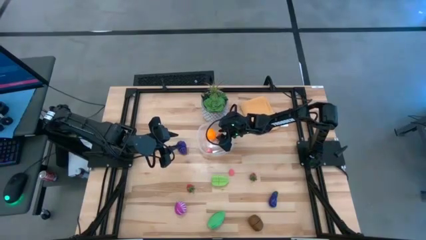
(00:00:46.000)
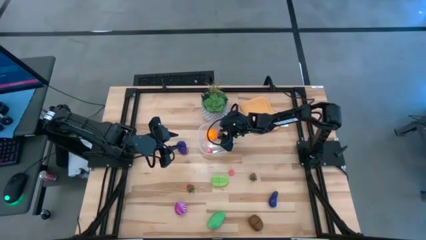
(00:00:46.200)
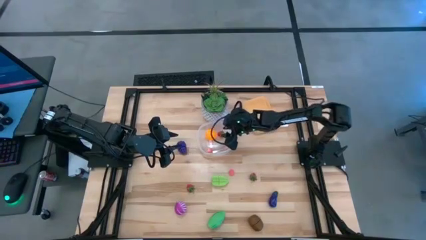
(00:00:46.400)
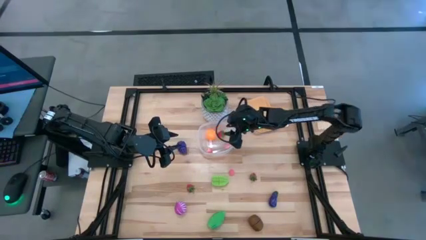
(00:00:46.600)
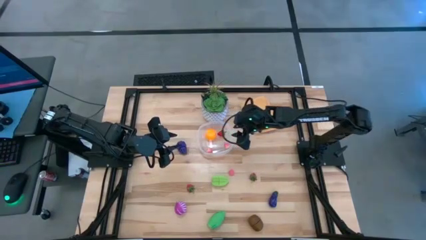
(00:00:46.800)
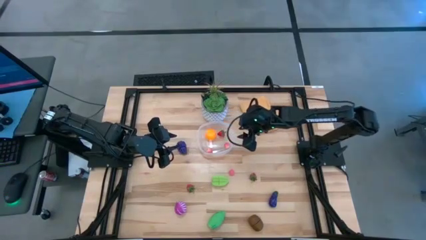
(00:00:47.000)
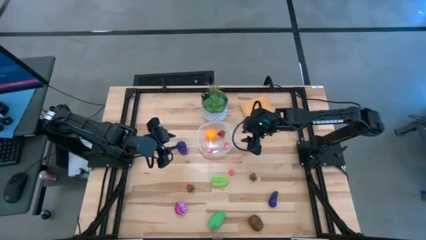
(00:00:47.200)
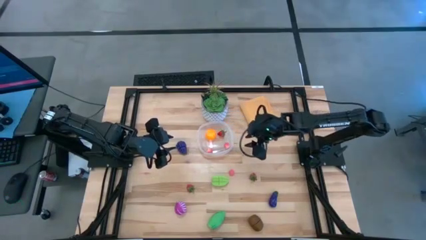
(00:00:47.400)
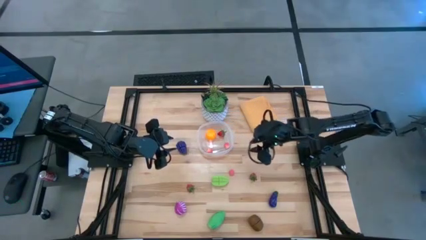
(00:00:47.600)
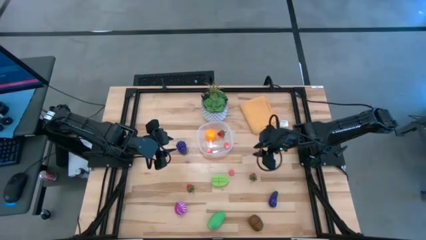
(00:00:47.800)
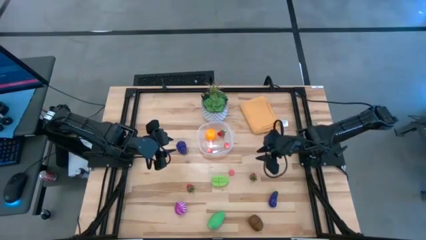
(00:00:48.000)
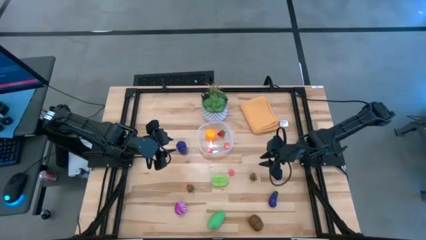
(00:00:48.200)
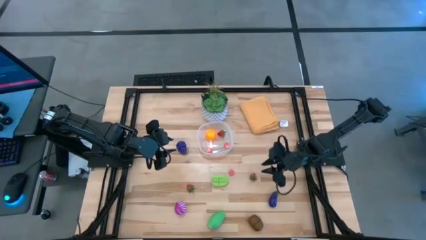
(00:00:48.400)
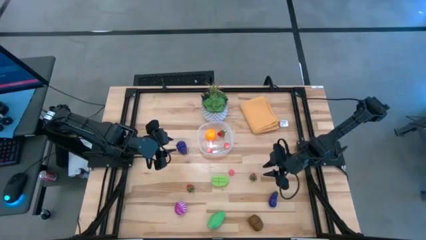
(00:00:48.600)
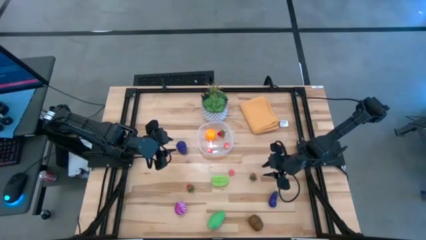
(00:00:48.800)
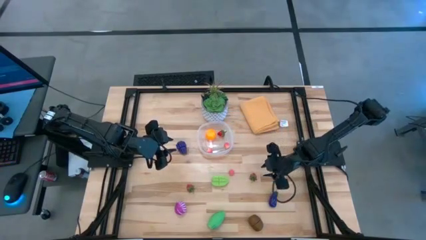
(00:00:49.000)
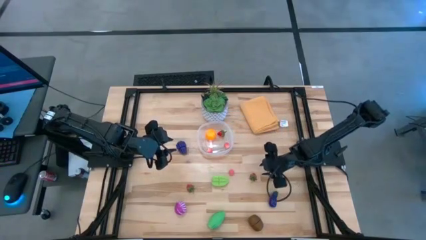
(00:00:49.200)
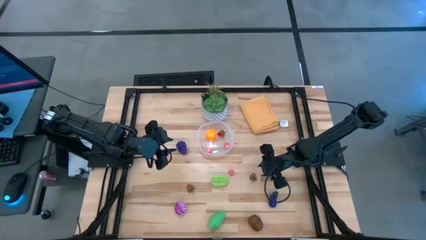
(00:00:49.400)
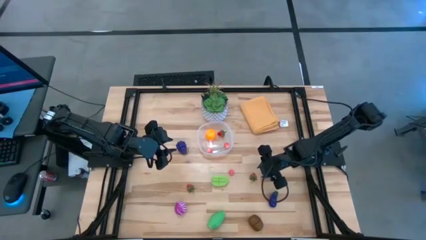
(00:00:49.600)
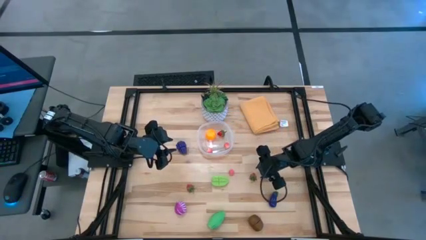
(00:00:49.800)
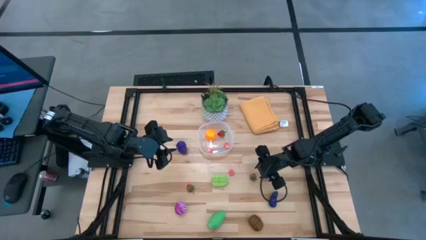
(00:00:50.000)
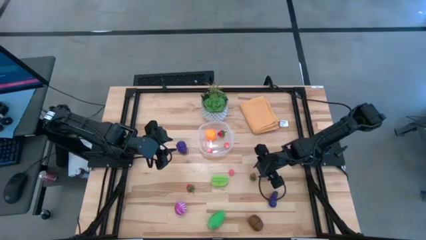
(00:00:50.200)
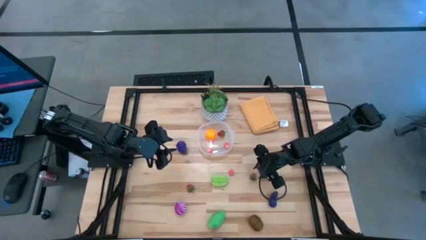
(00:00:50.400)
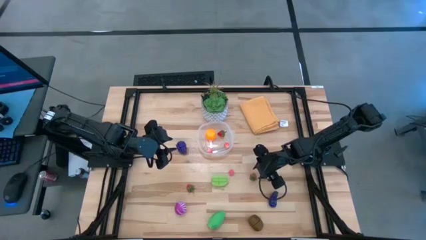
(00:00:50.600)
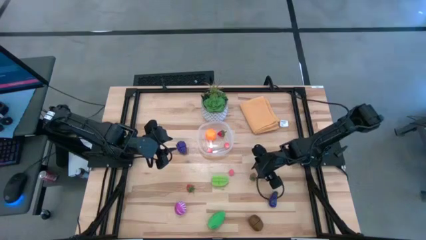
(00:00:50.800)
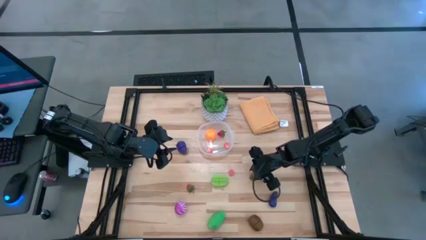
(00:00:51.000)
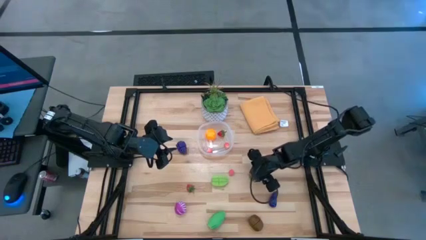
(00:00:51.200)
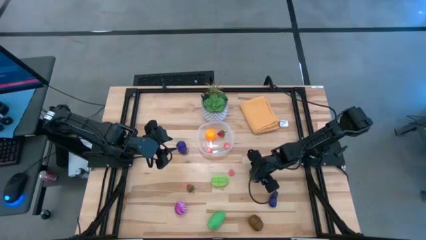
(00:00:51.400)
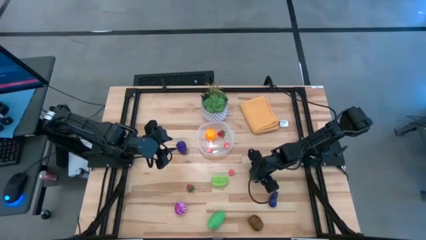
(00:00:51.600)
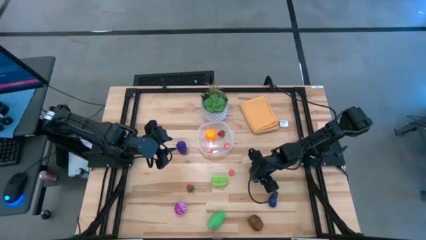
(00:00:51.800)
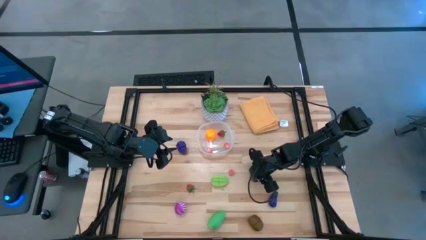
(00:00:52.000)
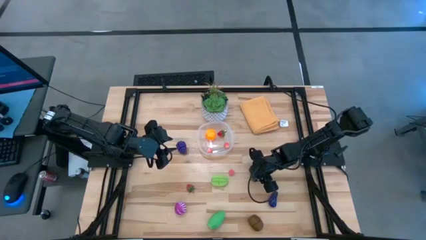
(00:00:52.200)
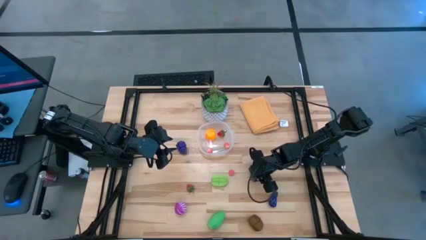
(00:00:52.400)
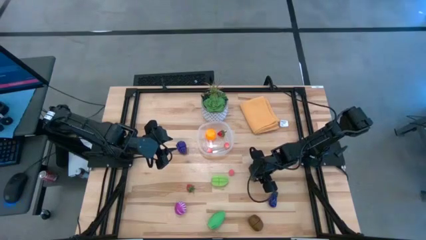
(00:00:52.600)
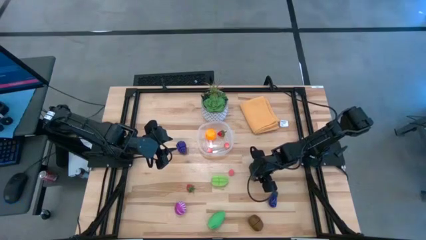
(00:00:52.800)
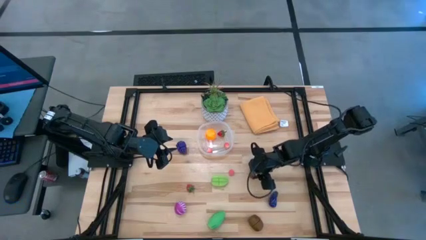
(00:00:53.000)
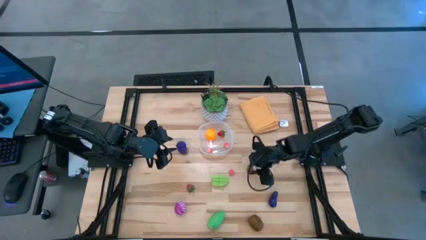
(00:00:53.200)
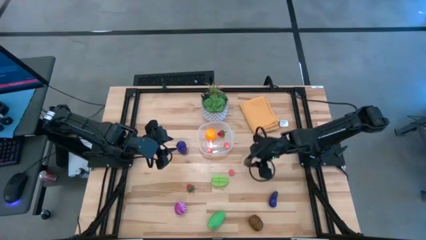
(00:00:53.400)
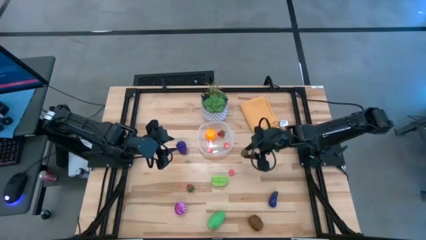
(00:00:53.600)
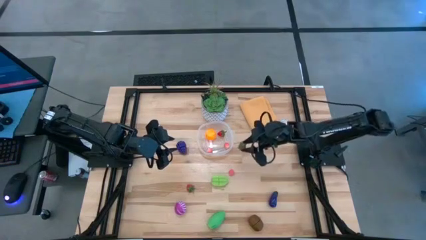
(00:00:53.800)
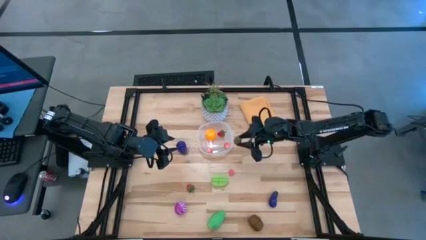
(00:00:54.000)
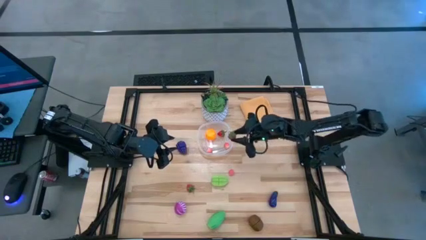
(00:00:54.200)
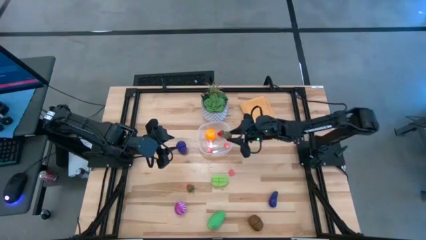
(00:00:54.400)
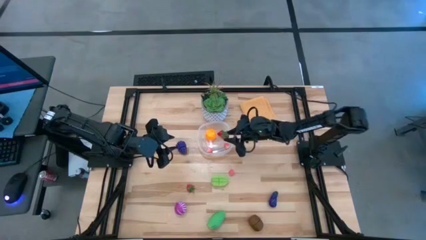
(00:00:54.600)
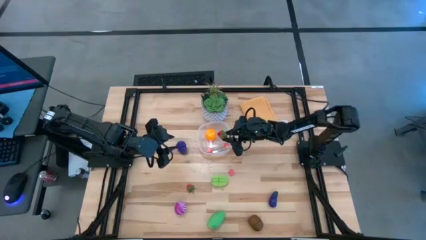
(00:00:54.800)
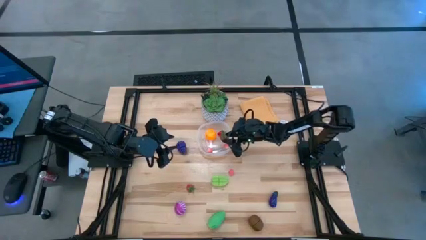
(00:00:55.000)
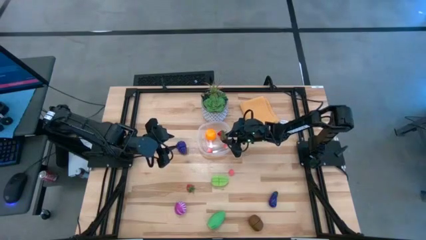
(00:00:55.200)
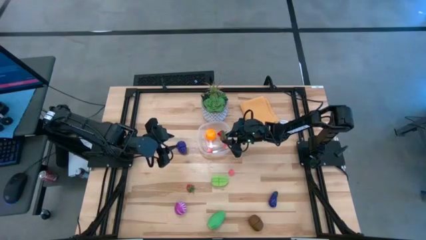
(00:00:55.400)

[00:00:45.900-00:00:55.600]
Task: Pick and placing Produce into tupperware
Put the right red strawberry into the transparent bin
